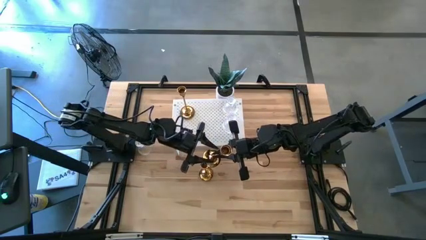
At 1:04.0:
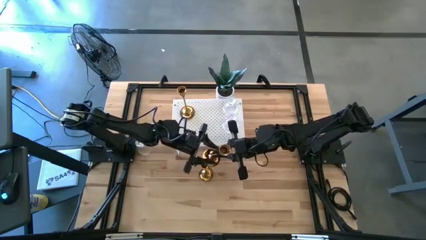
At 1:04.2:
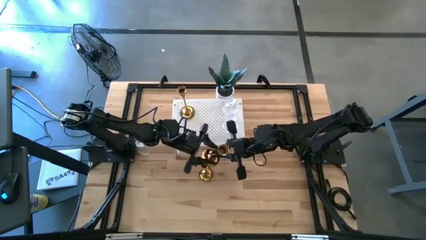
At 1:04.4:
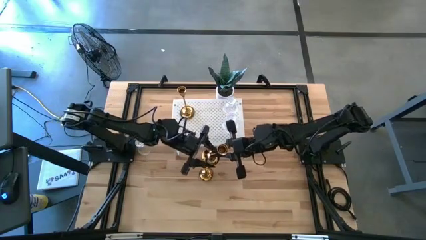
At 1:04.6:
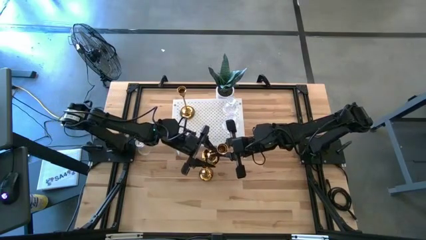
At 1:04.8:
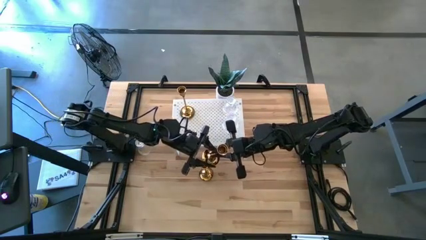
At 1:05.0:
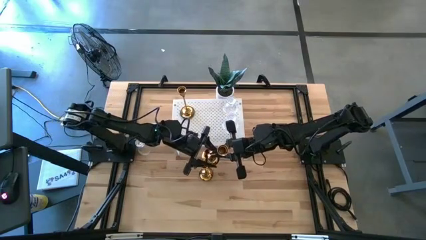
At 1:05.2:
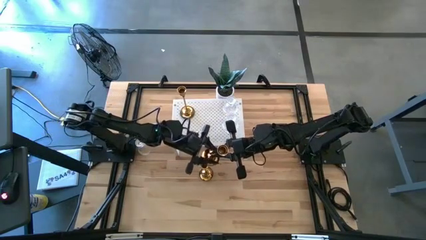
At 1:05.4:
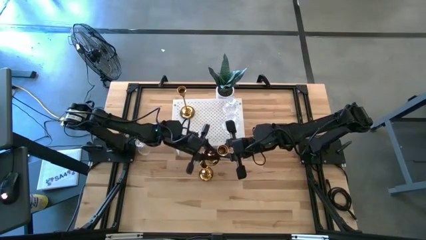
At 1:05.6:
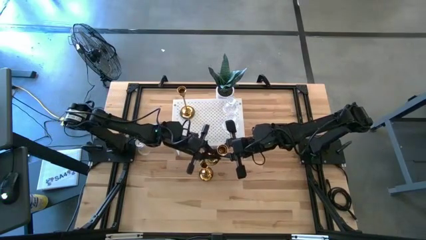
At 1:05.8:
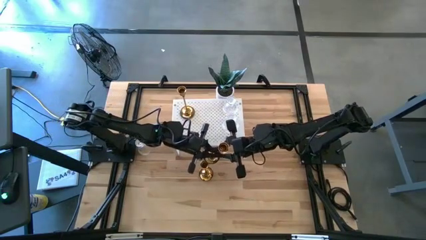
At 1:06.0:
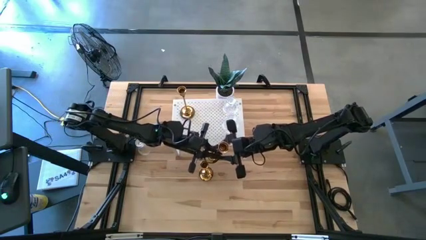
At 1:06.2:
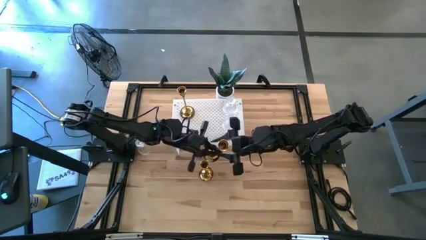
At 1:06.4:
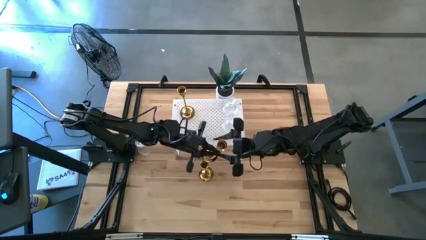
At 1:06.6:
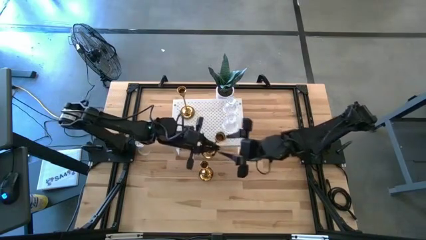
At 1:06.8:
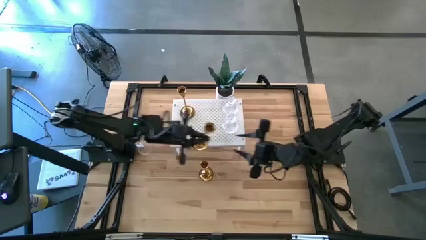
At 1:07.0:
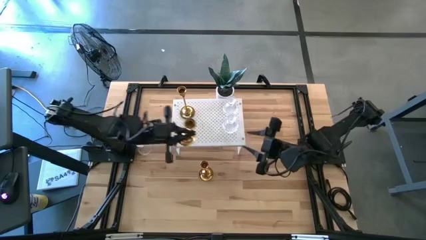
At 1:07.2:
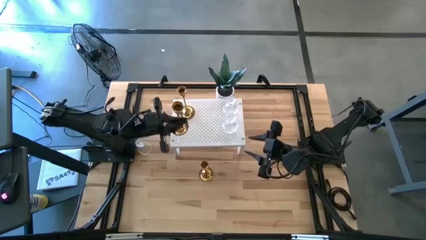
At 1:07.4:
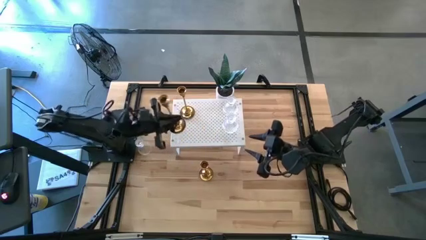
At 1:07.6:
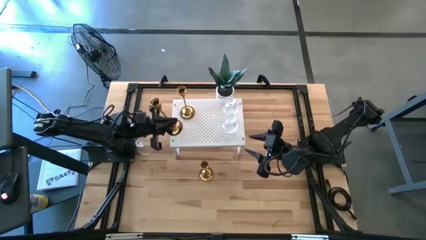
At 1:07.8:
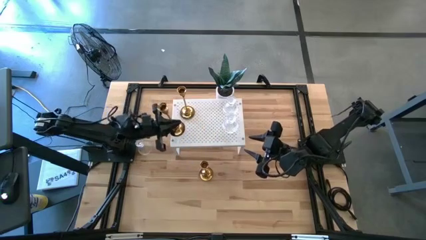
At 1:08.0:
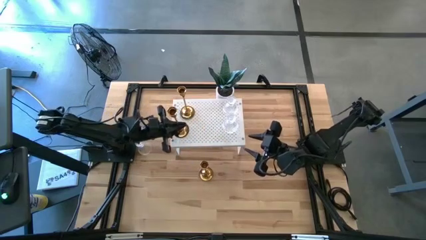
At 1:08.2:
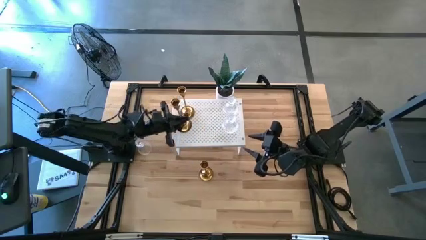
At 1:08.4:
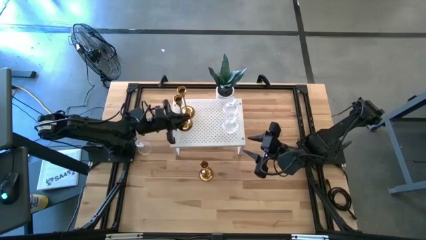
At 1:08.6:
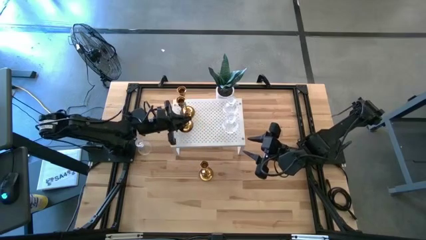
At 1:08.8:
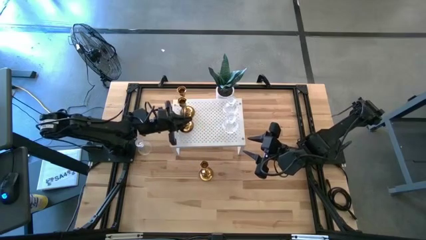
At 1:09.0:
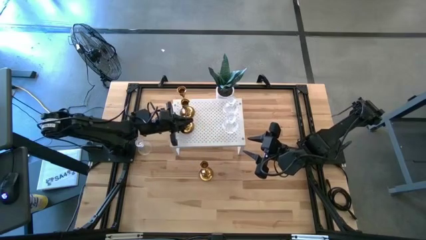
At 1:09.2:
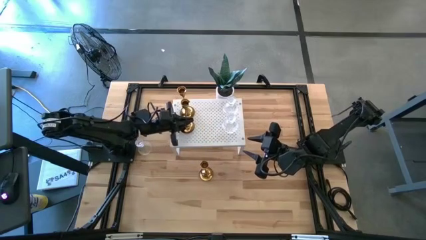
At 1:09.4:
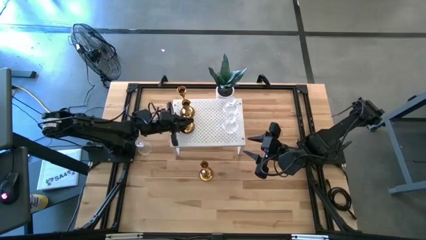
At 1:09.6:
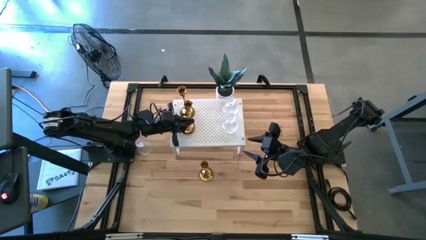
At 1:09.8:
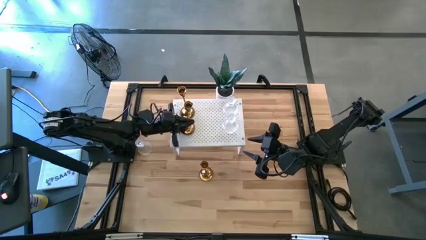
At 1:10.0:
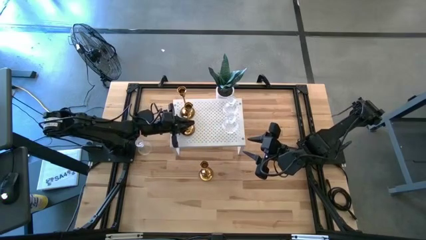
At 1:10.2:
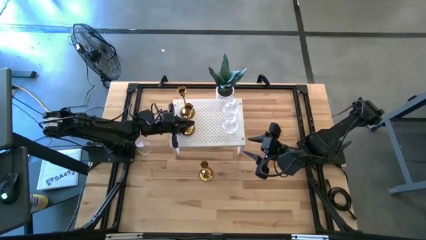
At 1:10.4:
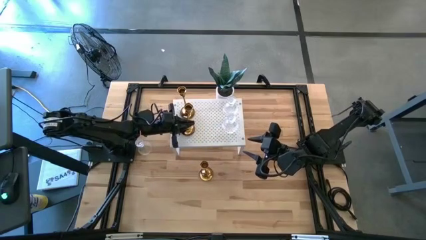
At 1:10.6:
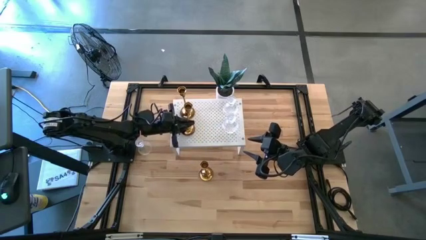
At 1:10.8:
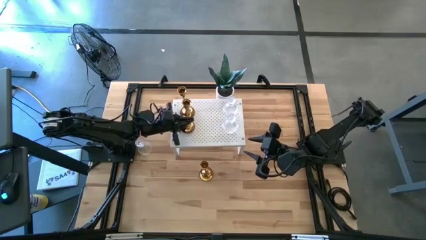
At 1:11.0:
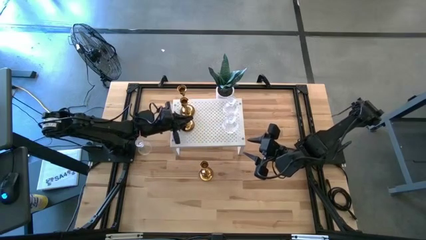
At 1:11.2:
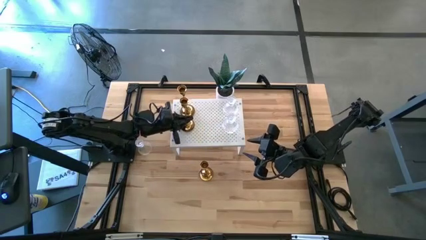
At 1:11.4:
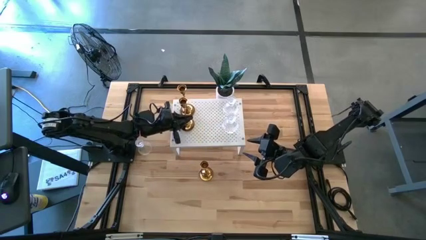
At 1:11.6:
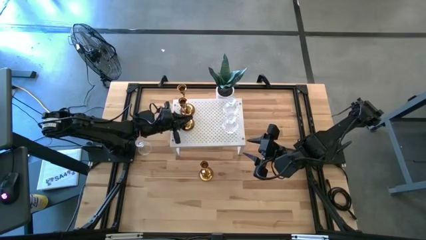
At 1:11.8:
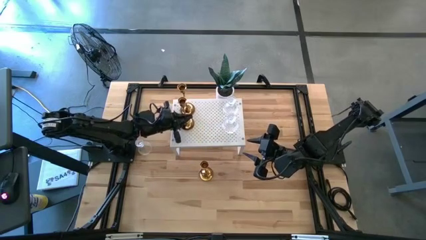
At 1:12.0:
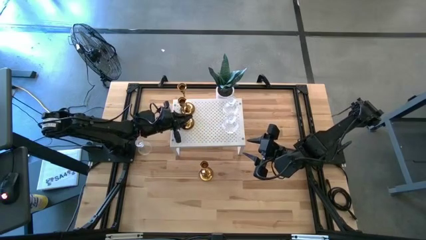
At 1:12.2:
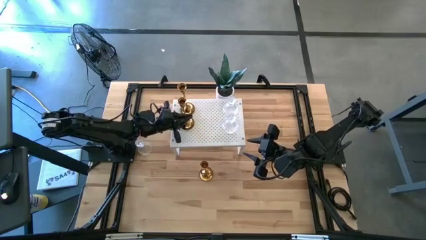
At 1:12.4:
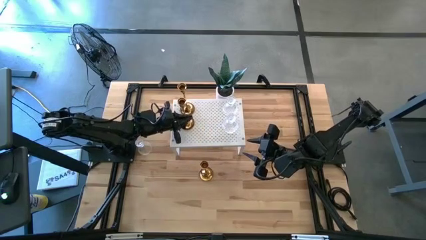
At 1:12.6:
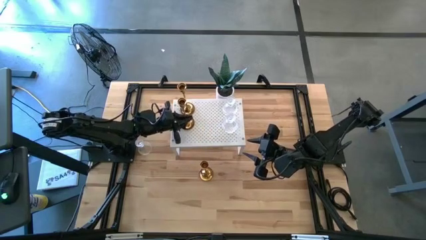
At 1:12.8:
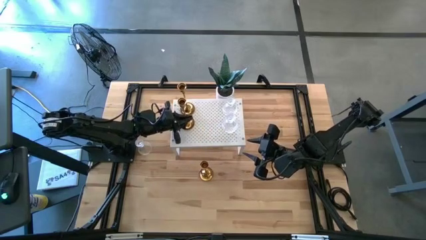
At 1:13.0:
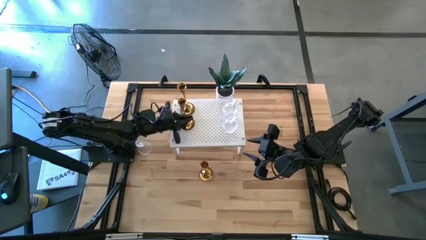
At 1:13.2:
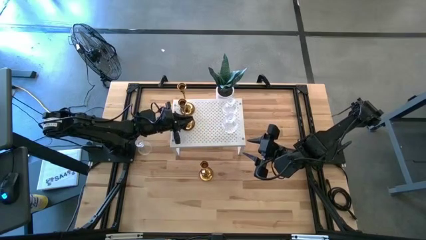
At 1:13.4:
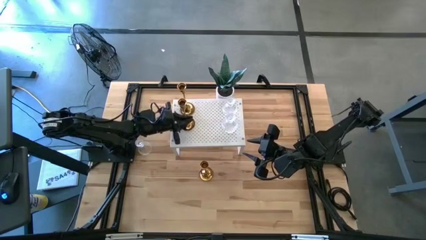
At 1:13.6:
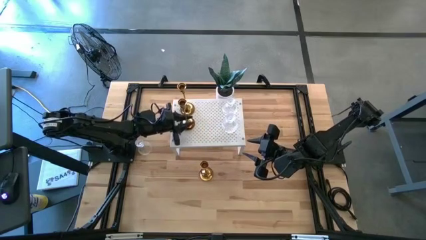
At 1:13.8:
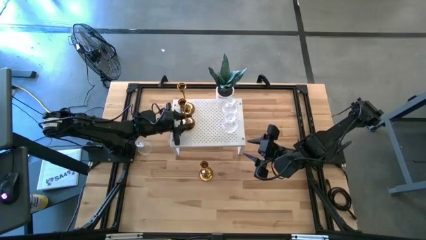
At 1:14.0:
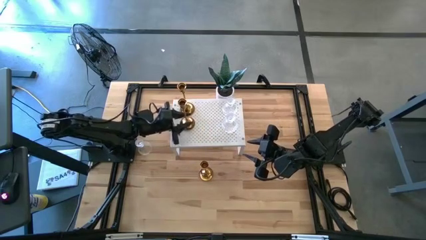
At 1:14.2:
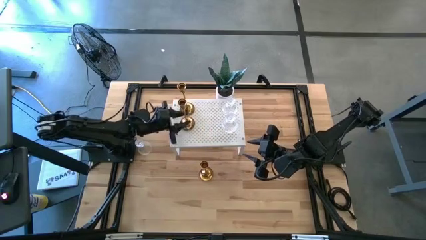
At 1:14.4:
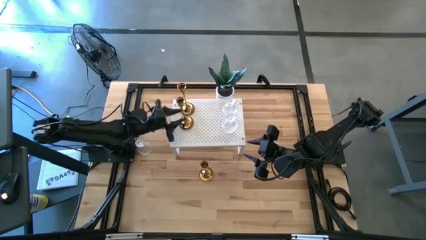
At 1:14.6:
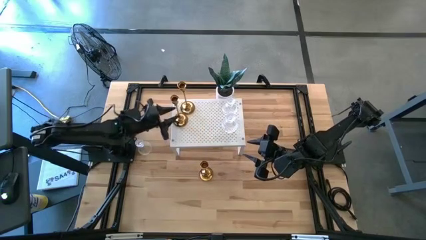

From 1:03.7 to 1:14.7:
Task: Pick & Place candle stick holders
Put the top gold candle holder on the shelf aligned with the other gold candle holder

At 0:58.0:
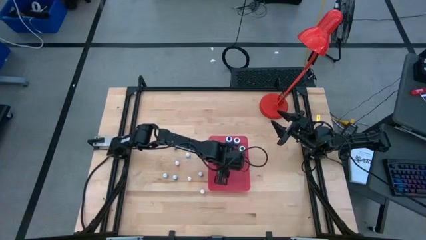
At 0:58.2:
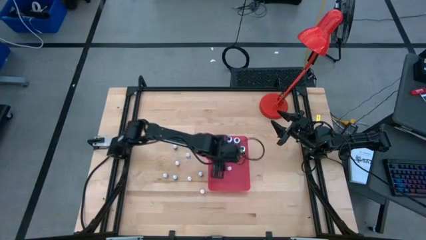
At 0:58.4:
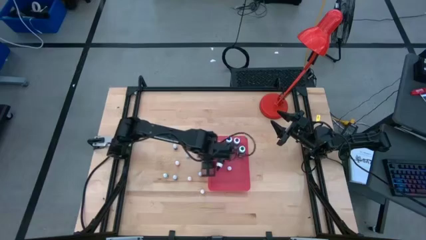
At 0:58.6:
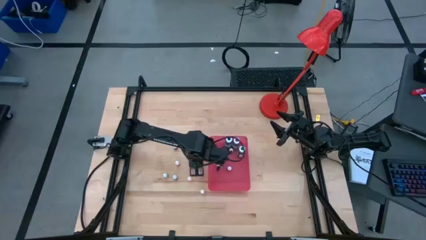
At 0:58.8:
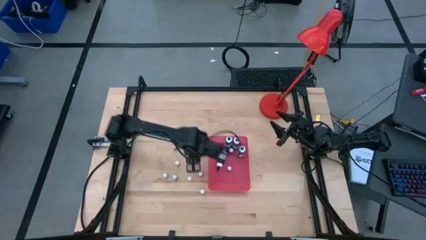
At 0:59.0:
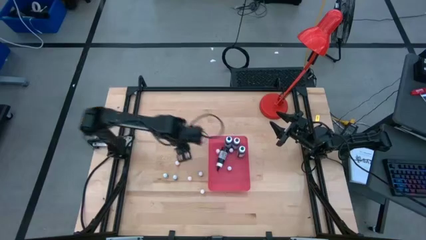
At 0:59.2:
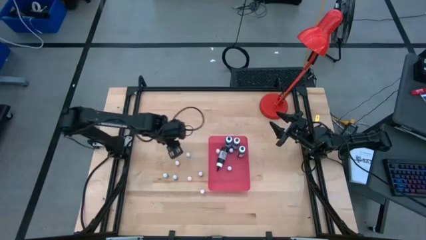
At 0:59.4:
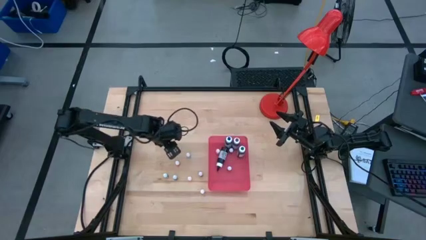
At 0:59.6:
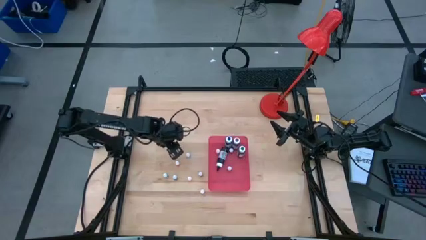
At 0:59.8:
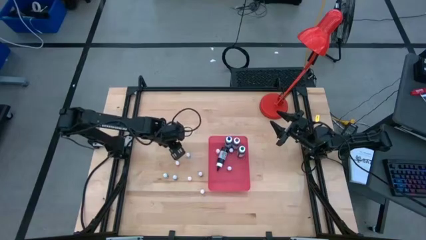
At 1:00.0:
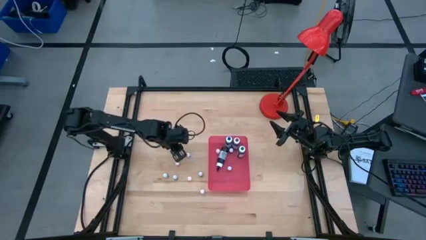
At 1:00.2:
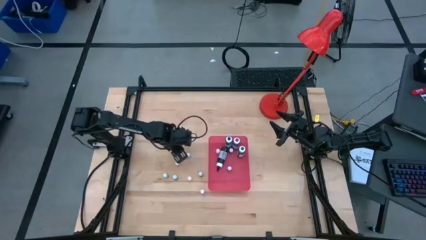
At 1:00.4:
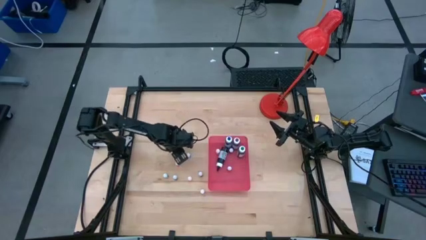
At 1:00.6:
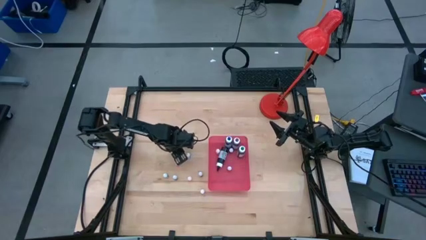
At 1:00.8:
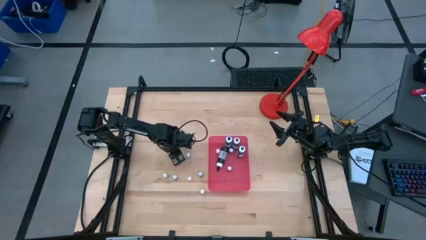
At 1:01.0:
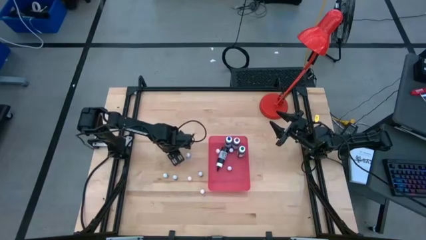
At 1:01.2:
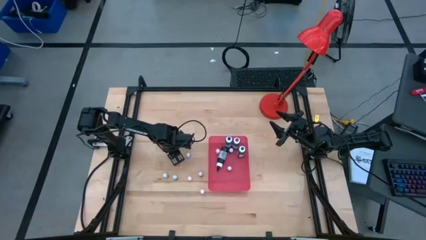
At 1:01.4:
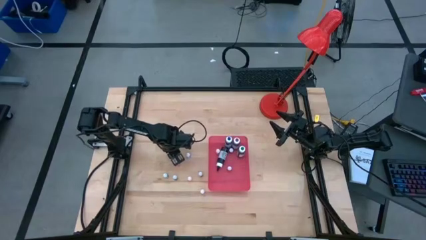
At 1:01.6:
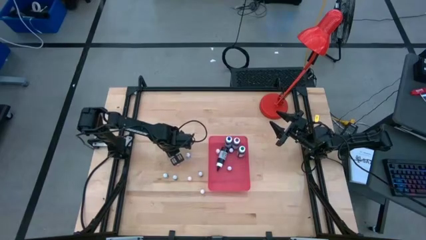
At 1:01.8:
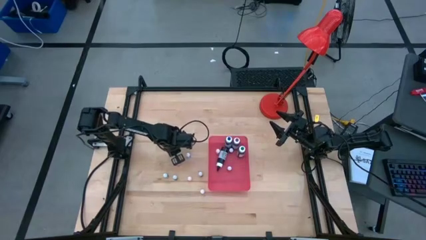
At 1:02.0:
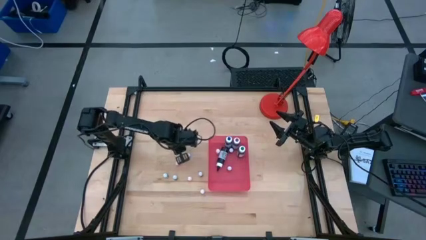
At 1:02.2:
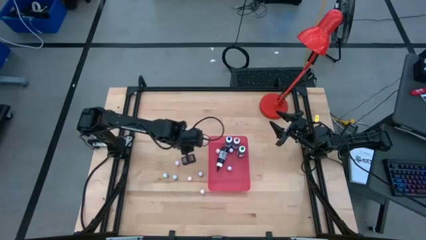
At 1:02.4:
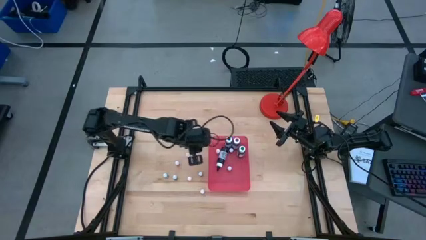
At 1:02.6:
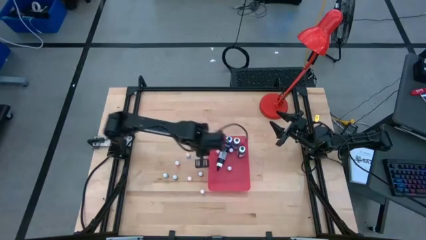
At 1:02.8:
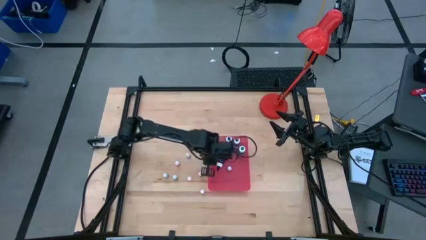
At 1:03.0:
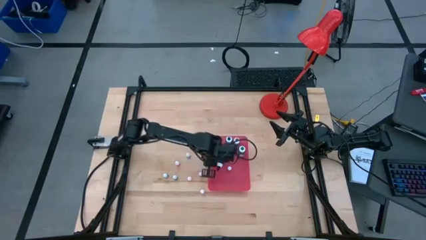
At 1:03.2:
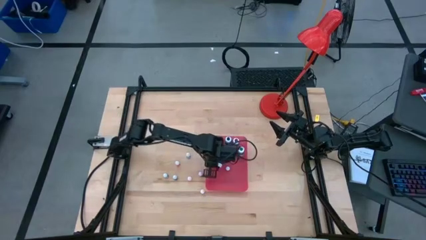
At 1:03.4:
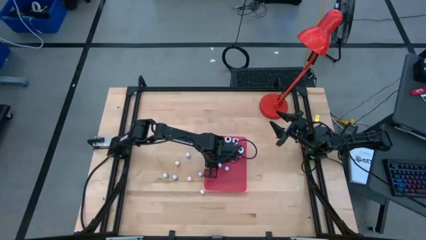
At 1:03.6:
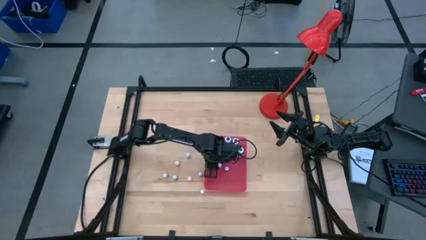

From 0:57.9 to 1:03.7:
Task: Pick & Place food coloring
Put the small blue food coloring bottle into the red bin
